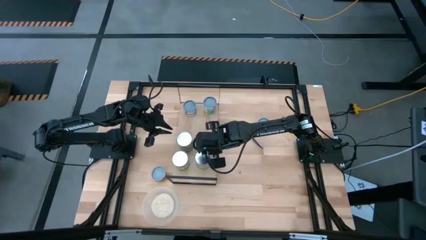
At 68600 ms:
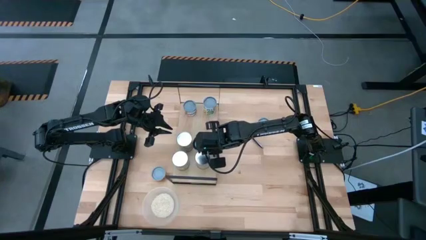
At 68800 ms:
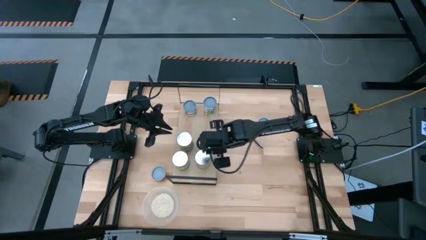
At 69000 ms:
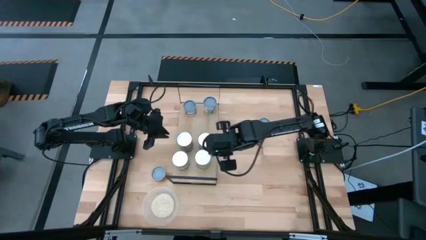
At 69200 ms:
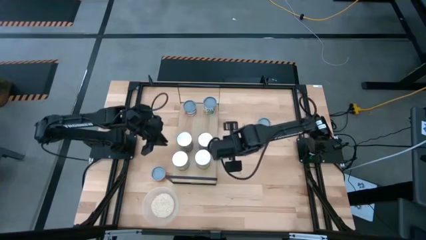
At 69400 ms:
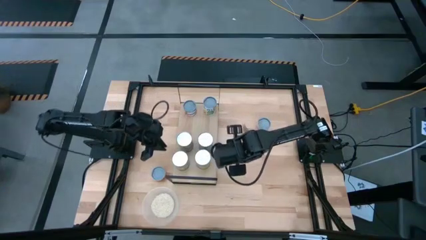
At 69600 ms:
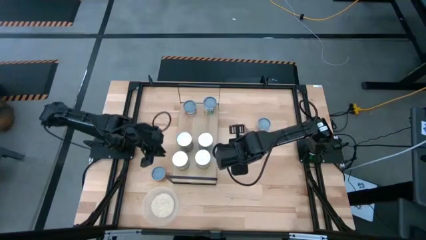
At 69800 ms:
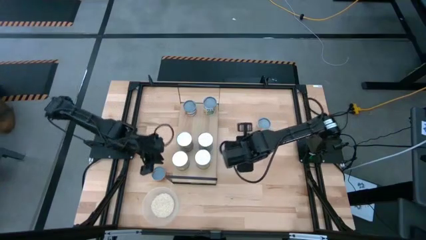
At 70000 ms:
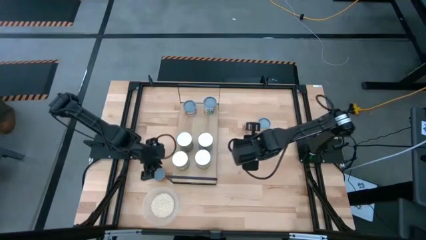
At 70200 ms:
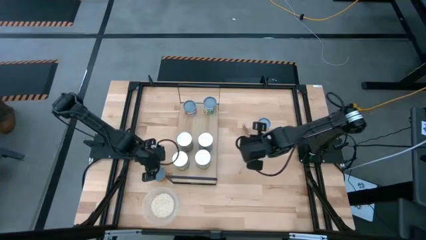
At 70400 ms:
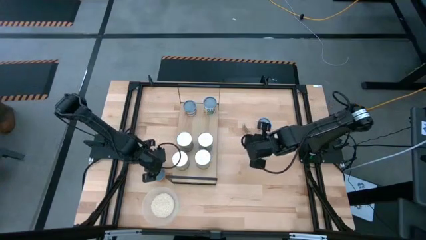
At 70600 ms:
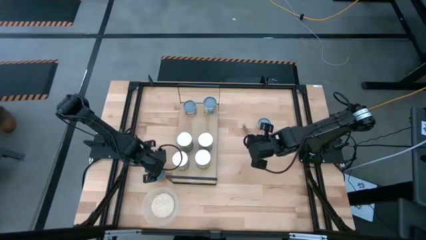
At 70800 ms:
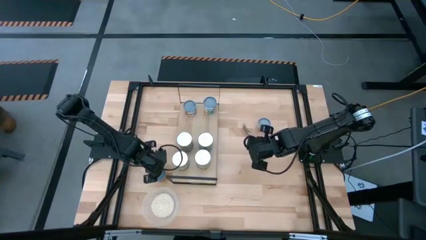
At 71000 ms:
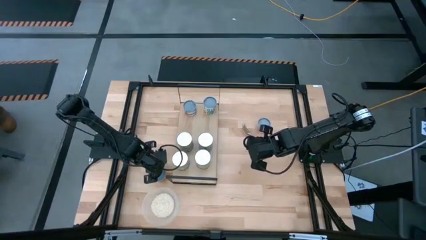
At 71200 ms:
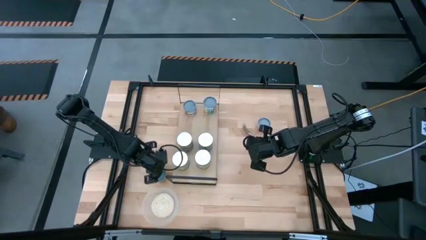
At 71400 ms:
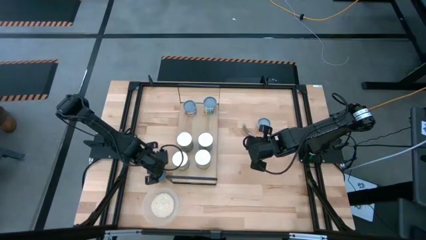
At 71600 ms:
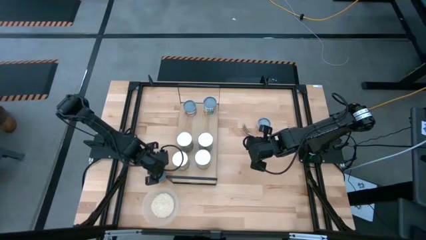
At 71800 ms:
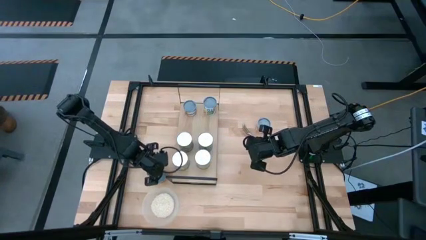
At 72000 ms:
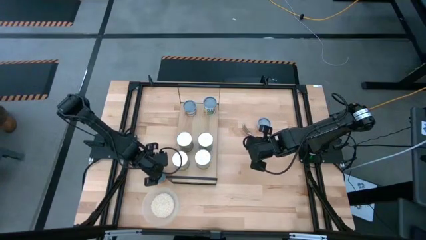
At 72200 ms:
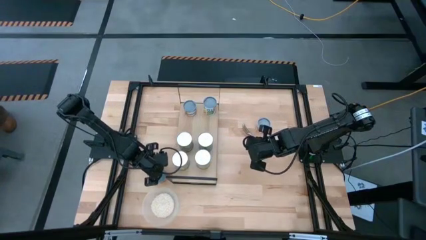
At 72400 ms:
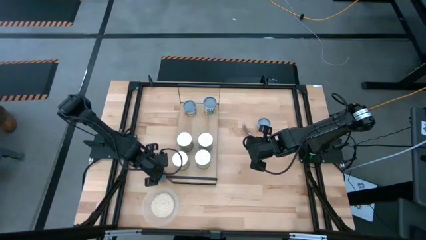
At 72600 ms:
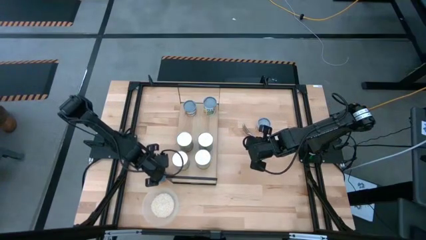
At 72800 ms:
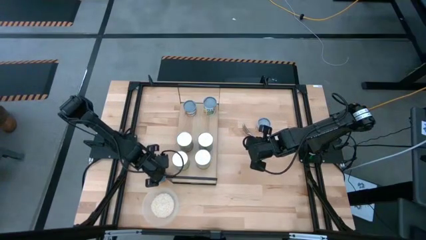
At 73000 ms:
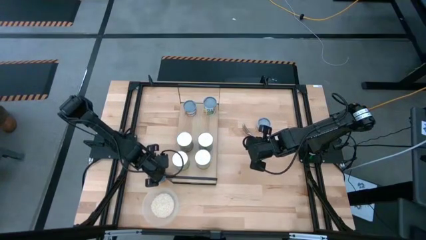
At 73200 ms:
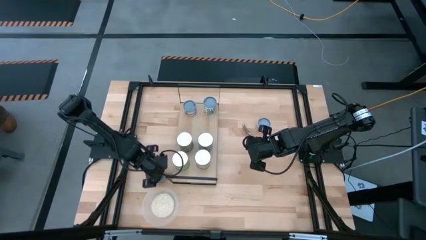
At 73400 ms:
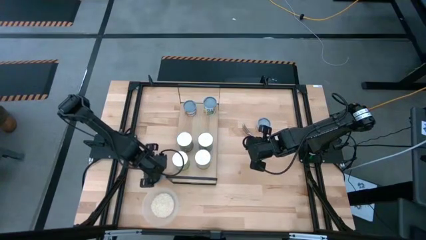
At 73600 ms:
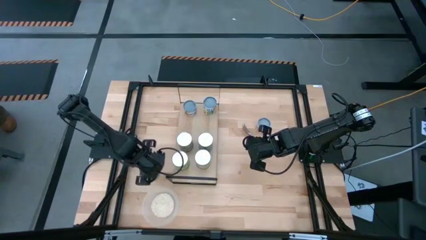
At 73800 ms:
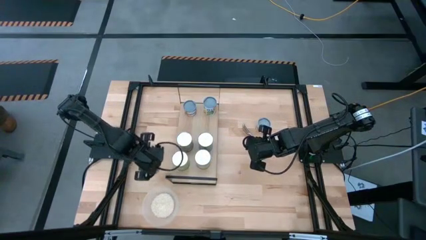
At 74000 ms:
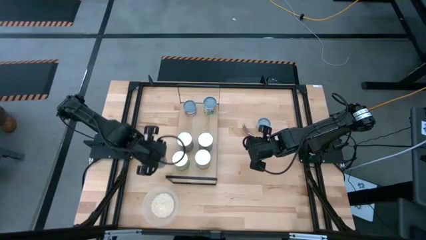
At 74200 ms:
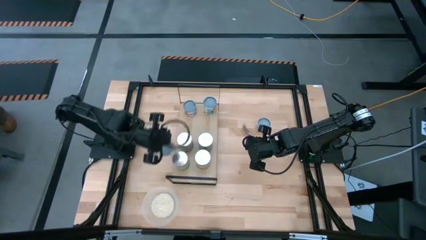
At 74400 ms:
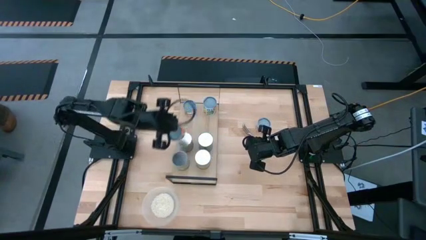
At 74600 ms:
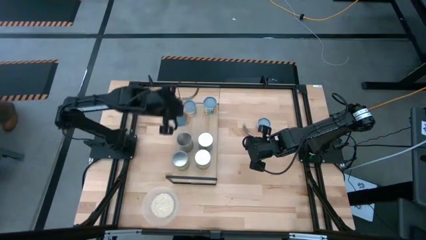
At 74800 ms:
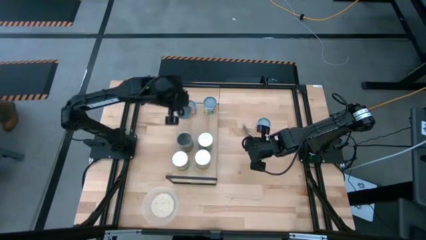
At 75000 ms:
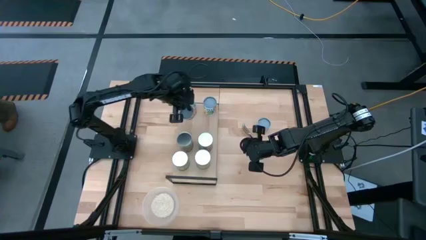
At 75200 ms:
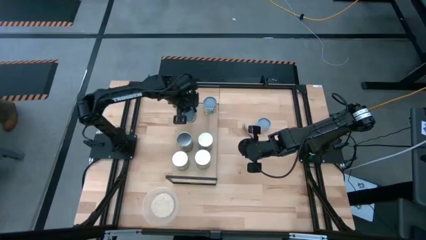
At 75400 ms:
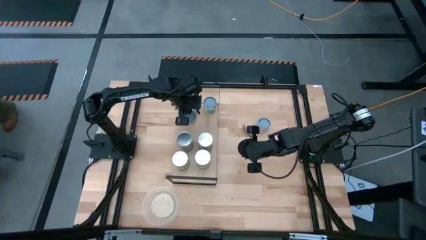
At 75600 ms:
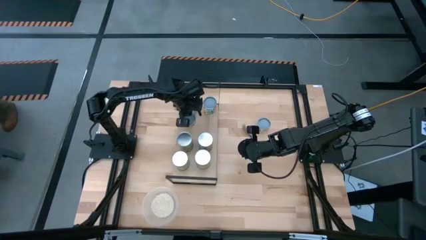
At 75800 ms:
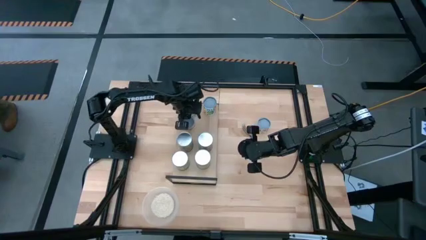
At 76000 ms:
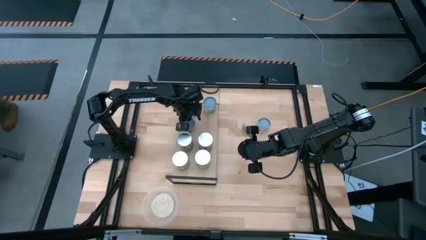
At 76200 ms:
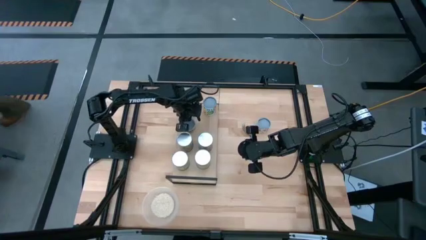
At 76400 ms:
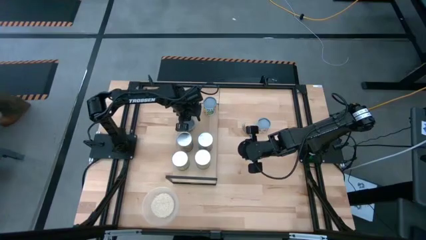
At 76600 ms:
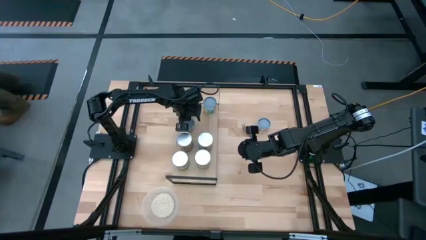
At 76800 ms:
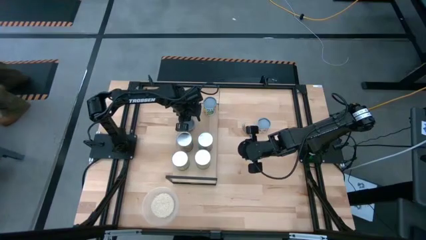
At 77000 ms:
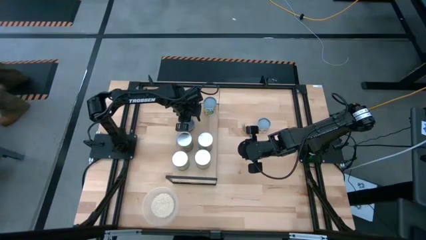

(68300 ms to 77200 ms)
Task: Pick and place cans onto a shelf
Put the canned pineapple rings on the shelf

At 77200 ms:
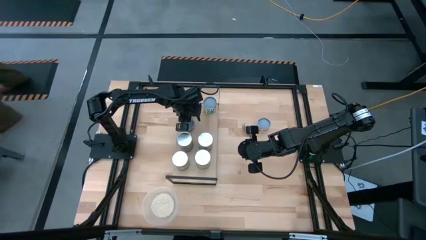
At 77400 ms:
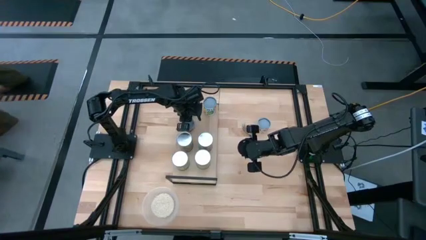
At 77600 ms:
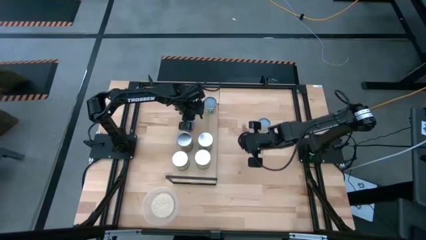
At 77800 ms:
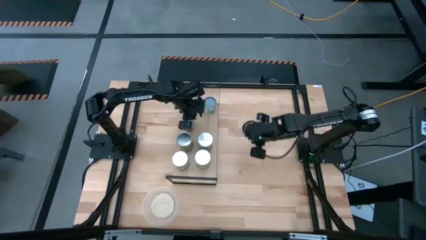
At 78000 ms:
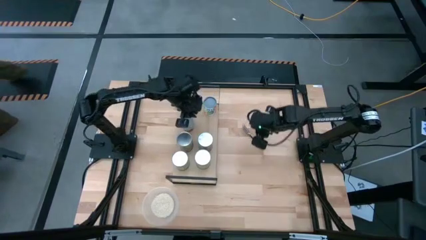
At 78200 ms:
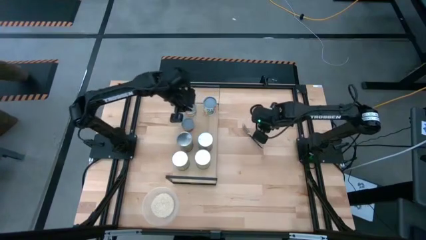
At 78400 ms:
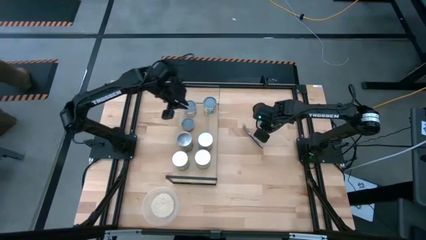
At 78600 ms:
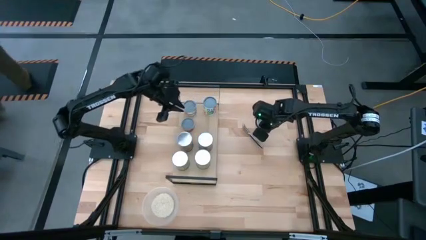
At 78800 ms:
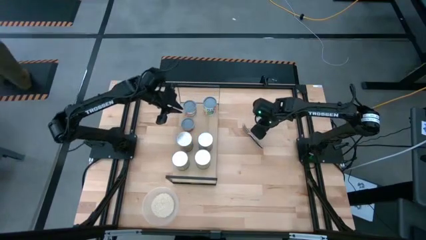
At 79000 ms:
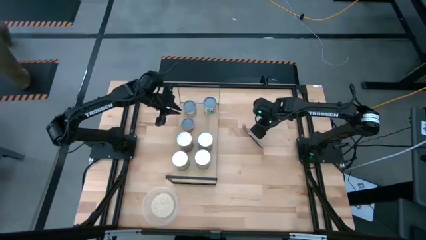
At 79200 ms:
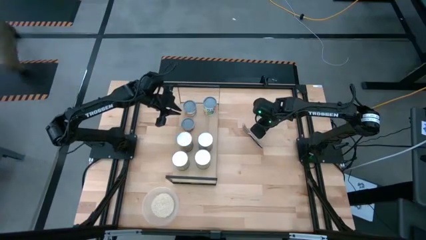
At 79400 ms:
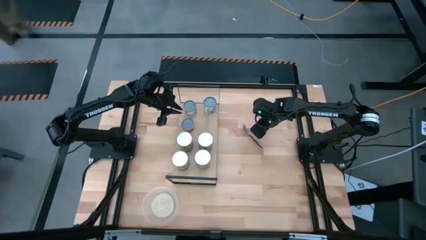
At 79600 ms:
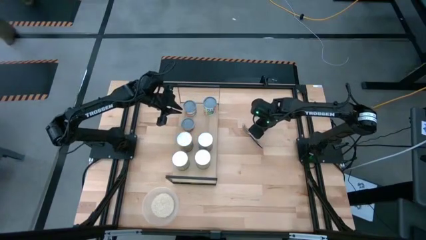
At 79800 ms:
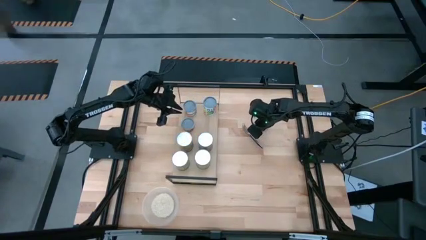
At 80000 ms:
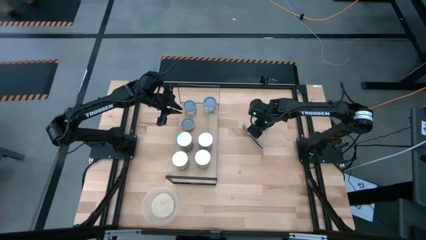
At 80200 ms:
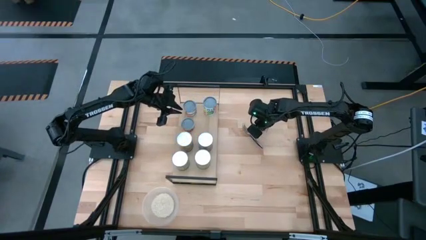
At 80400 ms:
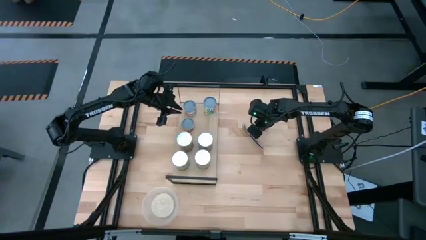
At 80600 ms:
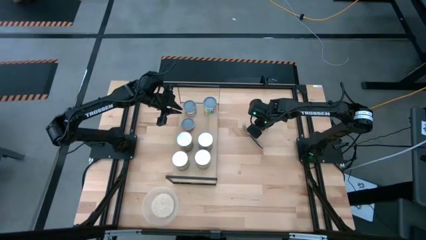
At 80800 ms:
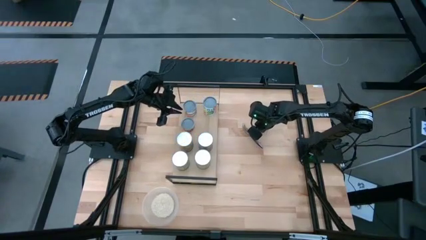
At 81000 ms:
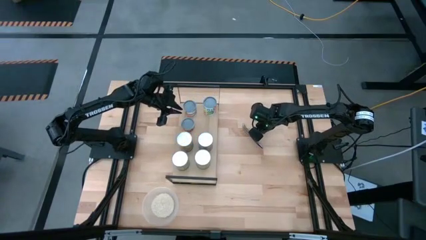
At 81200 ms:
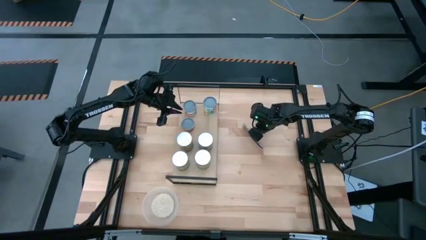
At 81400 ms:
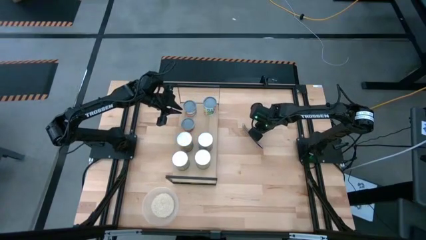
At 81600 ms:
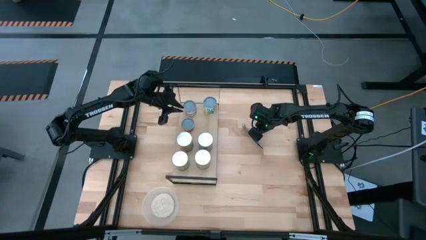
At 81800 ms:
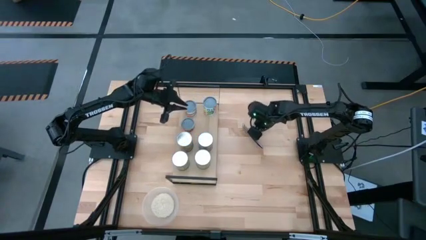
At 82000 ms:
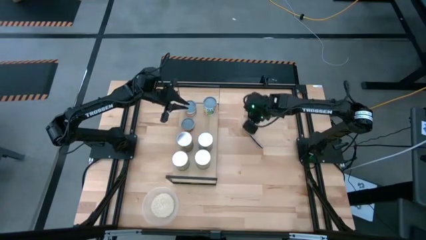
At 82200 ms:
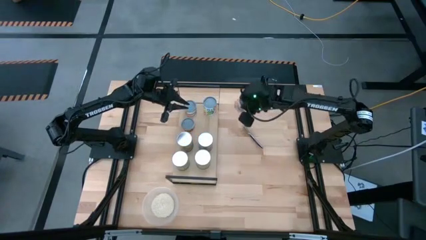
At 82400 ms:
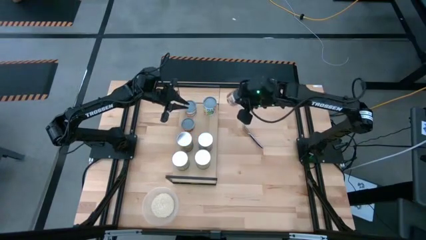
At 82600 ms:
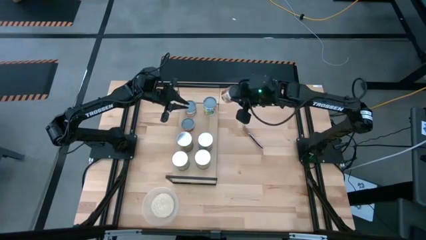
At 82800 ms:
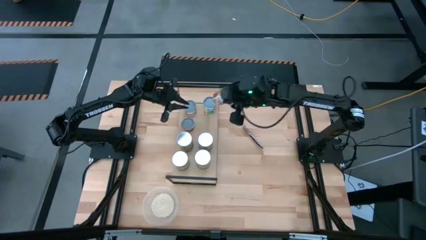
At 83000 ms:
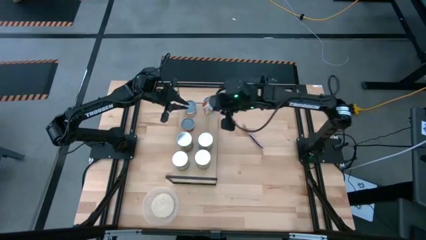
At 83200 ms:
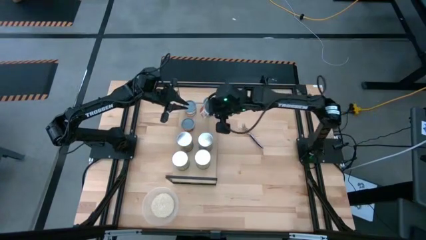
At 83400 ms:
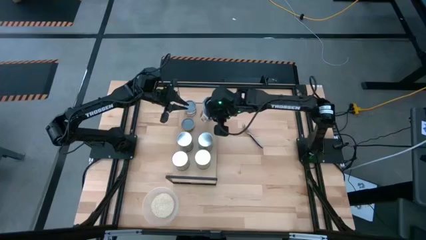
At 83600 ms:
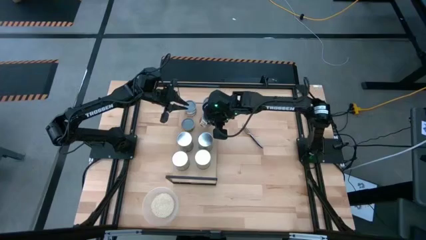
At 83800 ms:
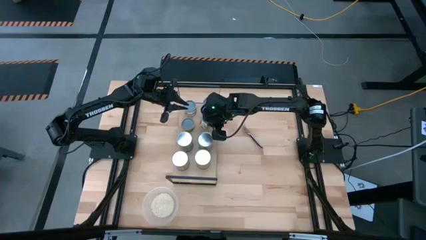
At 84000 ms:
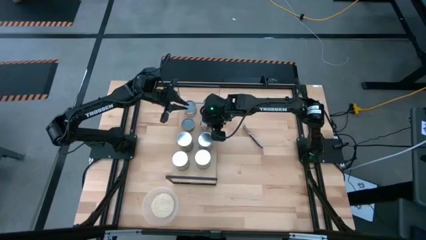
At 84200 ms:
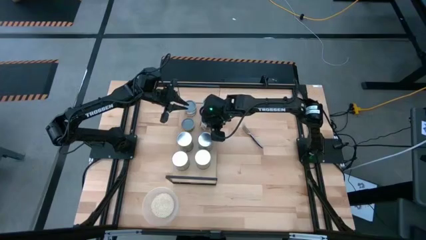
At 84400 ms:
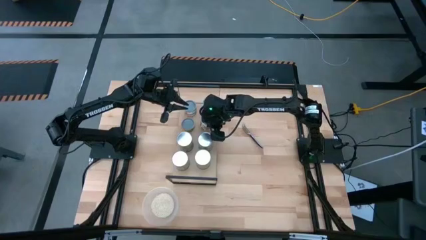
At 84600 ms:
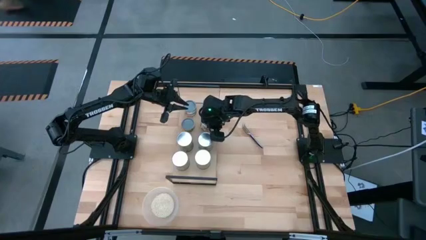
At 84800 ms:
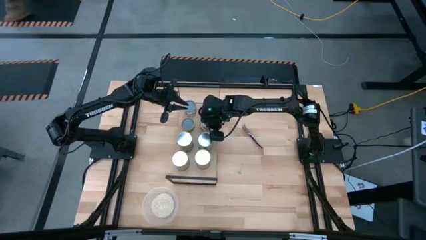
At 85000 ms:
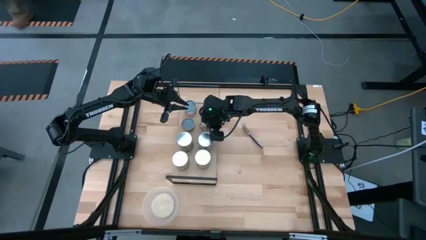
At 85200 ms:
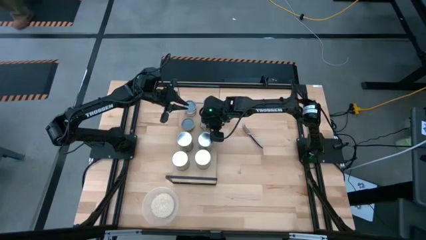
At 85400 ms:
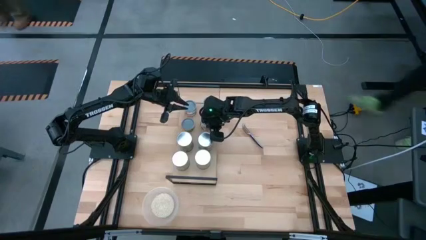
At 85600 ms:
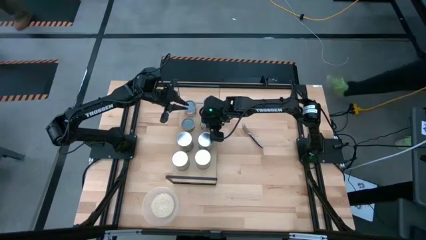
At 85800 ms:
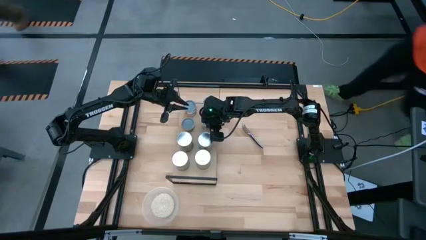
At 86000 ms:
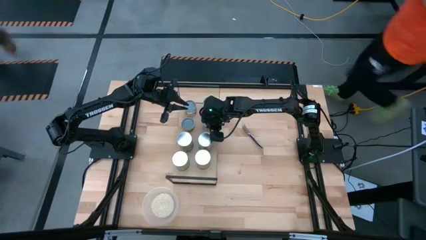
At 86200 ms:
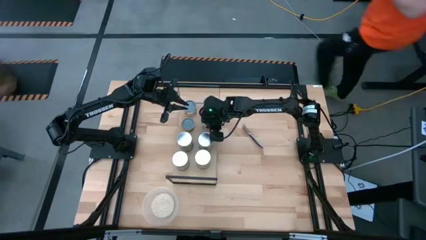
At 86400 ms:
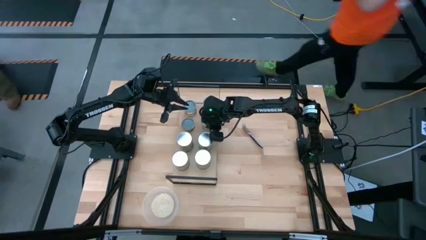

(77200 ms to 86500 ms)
Put the canned dice tomatoes on the shelf
